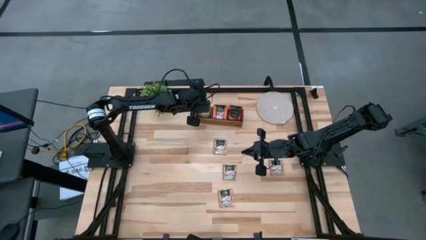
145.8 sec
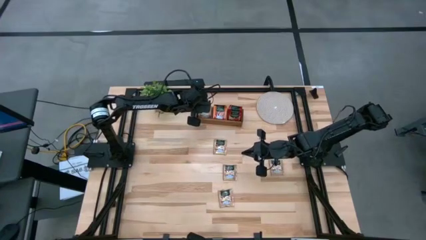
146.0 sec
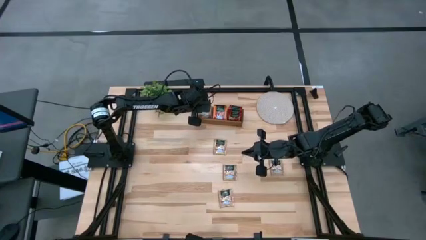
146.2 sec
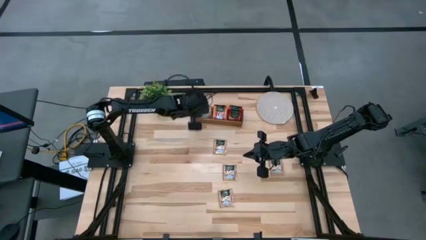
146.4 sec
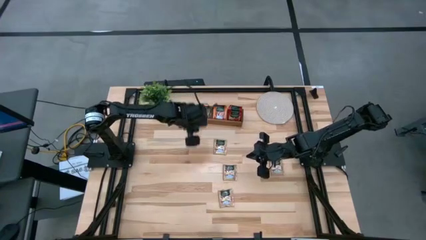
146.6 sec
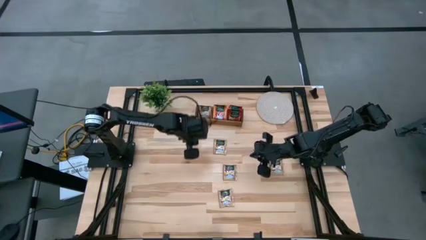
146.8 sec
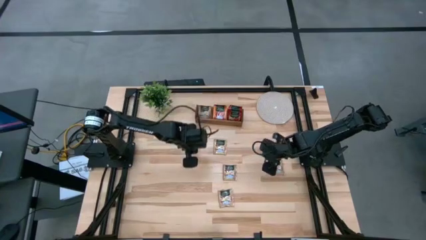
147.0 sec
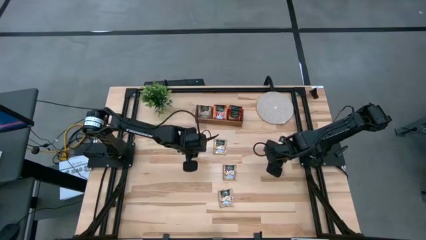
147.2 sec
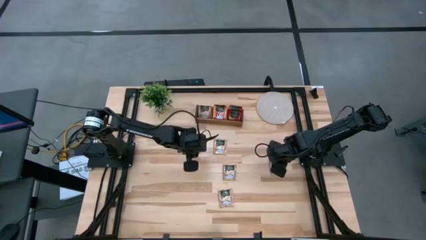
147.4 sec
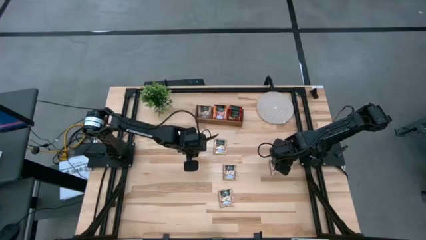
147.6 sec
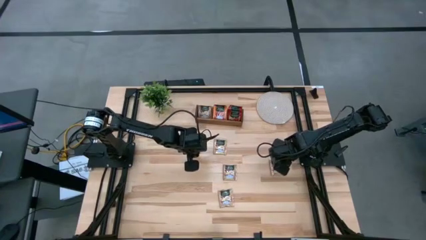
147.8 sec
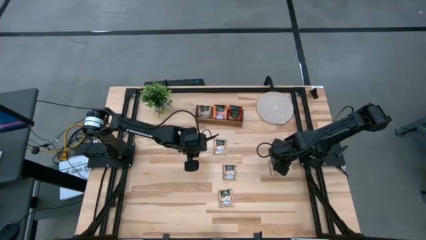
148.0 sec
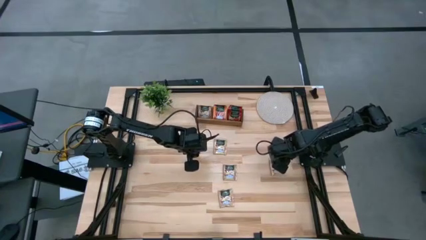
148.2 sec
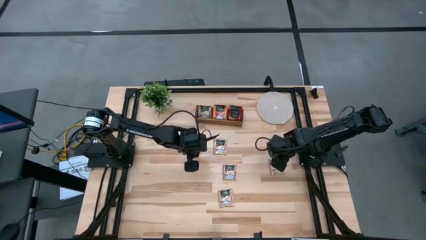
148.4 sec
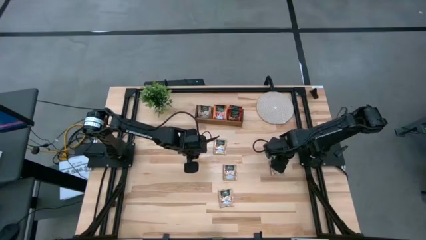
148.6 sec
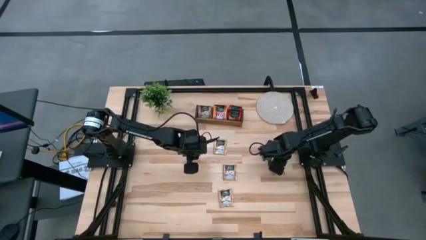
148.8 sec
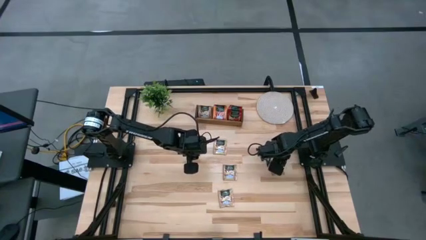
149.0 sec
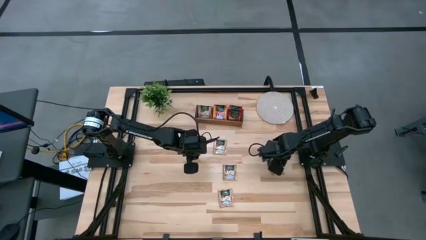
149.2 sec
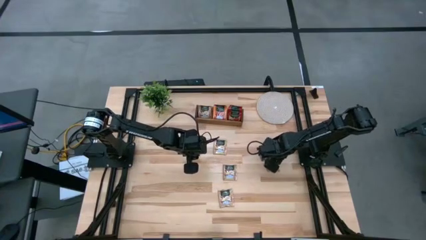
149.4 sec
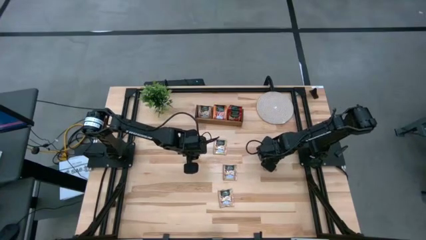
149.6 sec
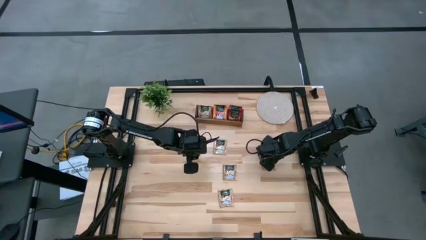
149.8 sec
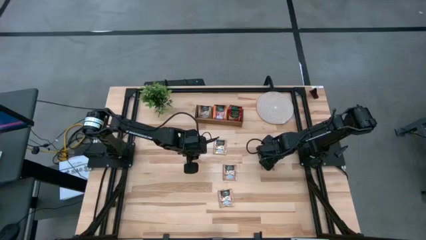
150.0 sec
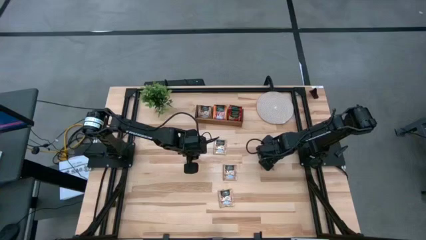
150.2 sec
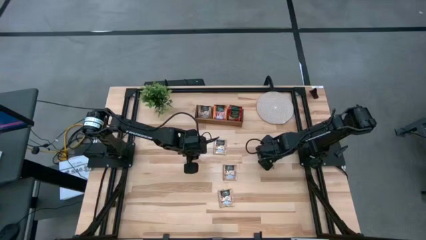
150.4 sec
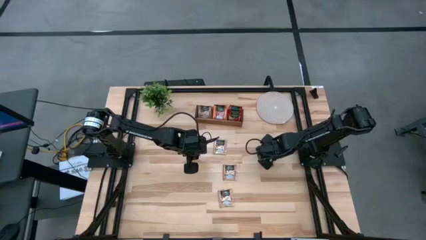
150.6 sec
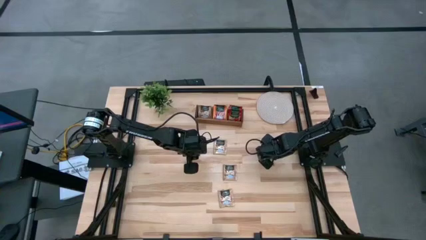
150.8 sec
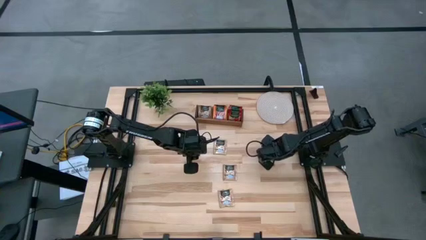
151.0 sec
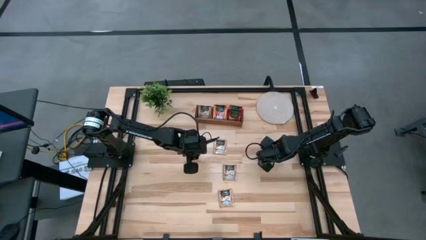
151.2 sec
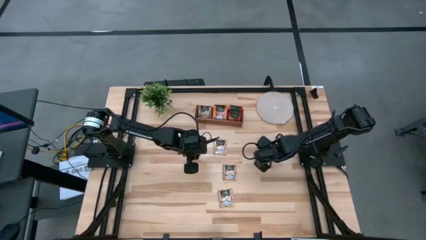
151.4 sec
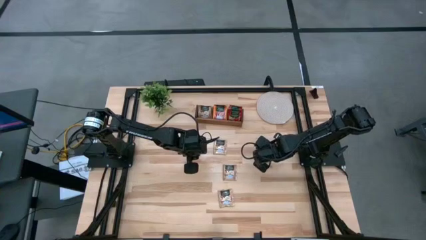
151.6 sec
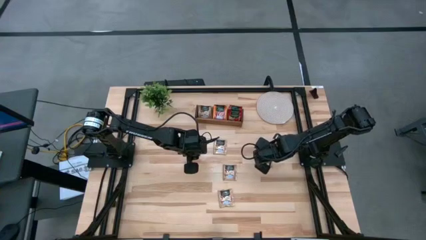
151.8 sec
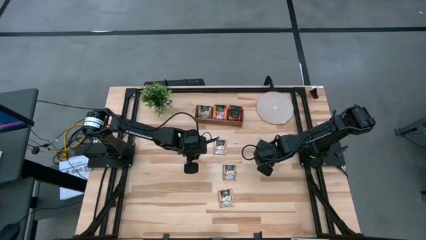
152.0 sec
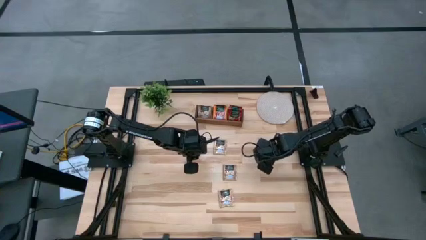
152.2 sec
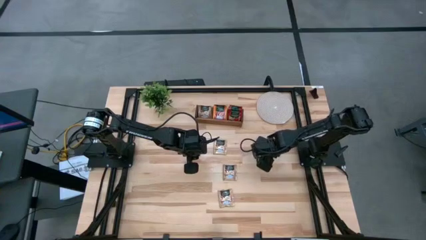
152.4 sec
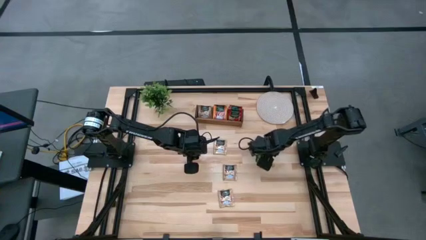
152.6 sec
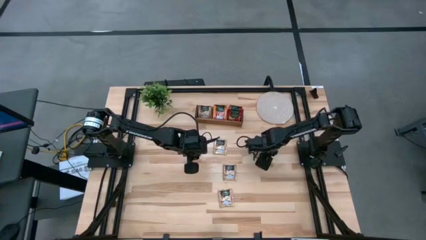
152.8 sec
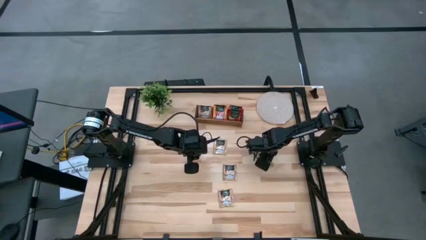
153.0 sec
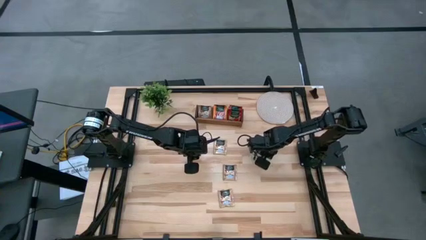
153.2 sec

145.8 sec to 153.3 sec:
Task: Pick & Place Tea
Put the brown tea bag into the left section of the wooden organizer

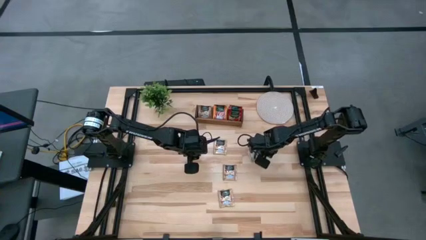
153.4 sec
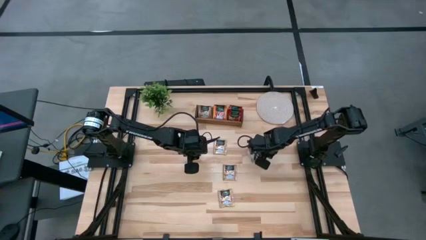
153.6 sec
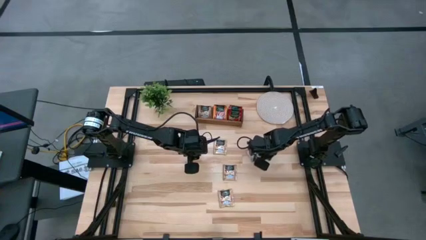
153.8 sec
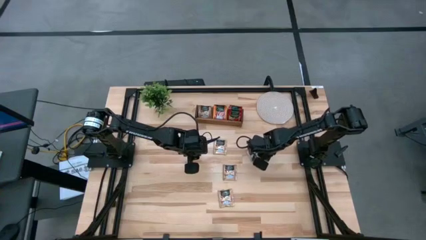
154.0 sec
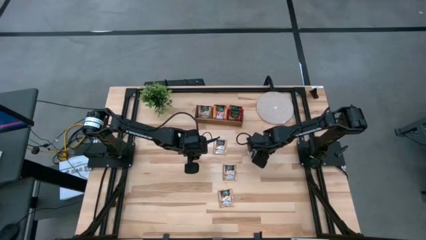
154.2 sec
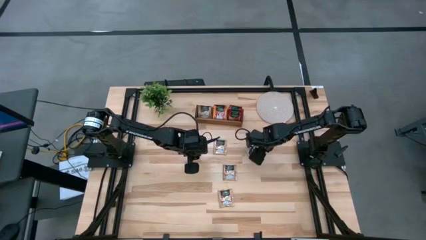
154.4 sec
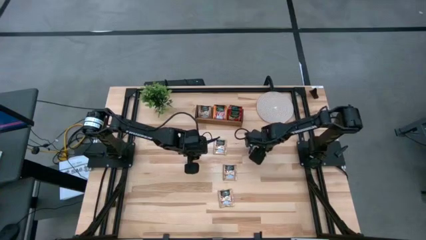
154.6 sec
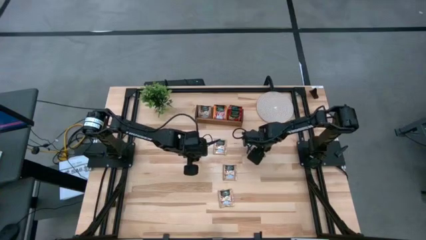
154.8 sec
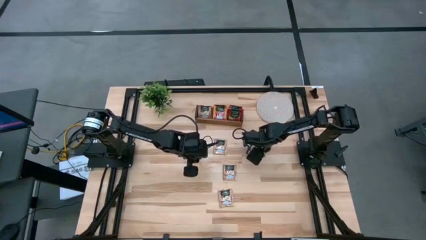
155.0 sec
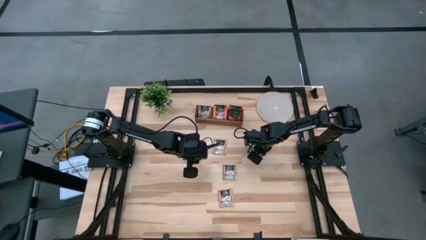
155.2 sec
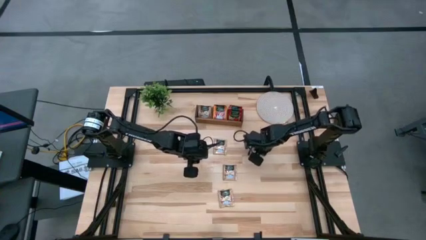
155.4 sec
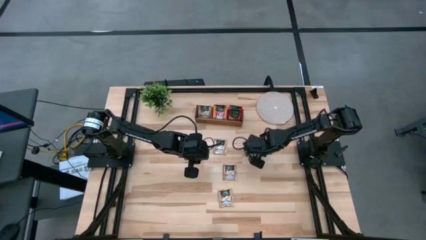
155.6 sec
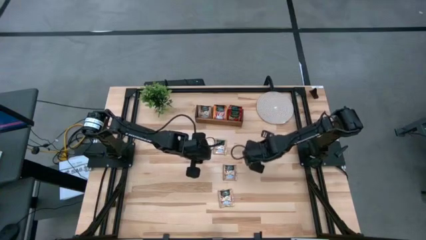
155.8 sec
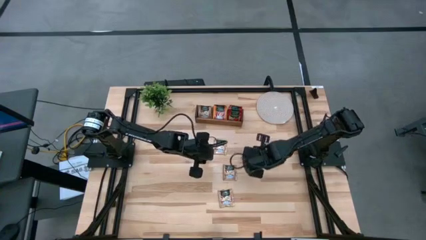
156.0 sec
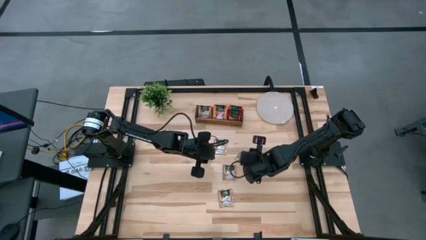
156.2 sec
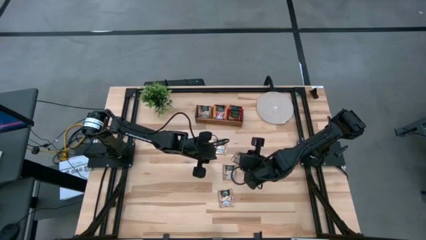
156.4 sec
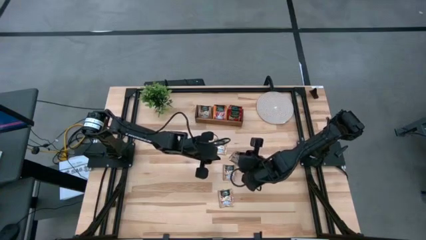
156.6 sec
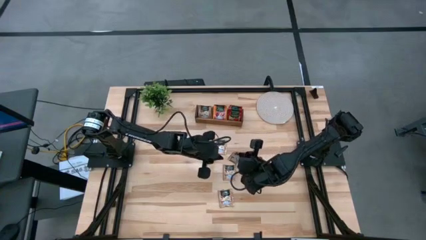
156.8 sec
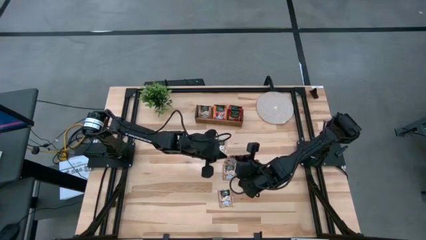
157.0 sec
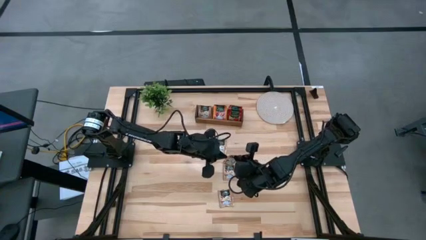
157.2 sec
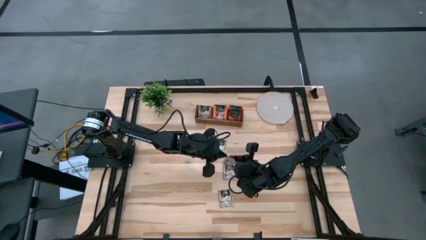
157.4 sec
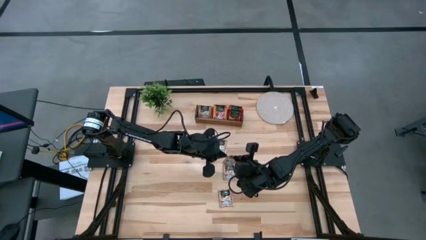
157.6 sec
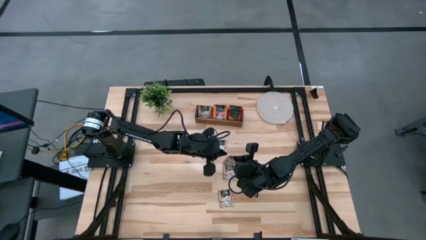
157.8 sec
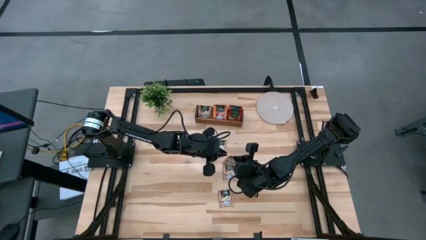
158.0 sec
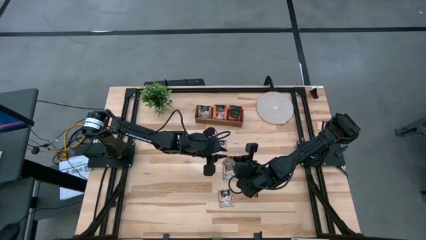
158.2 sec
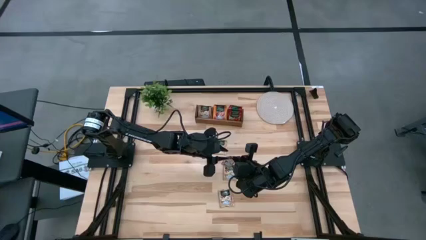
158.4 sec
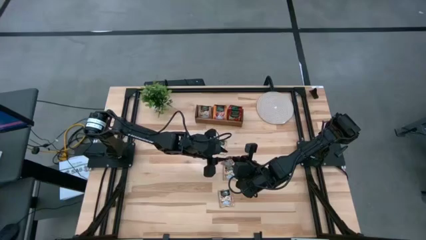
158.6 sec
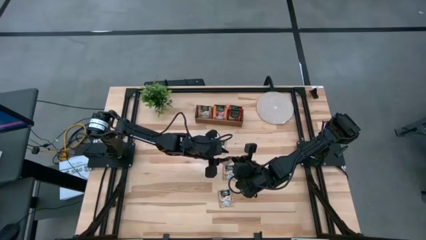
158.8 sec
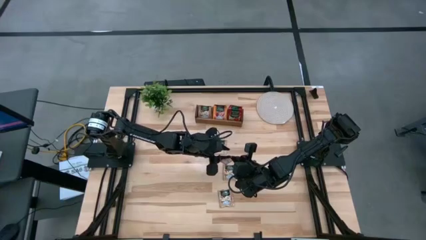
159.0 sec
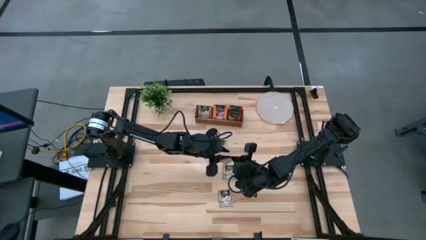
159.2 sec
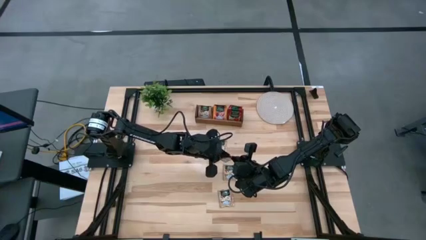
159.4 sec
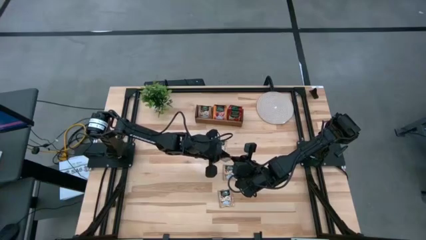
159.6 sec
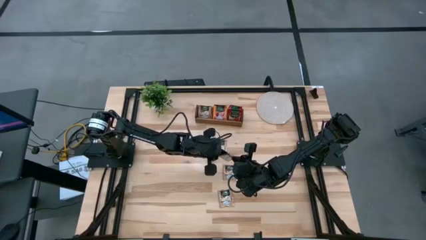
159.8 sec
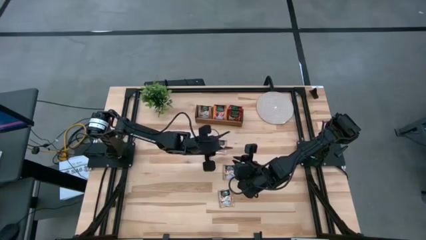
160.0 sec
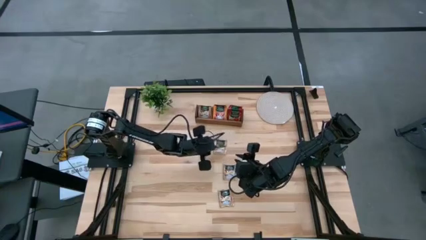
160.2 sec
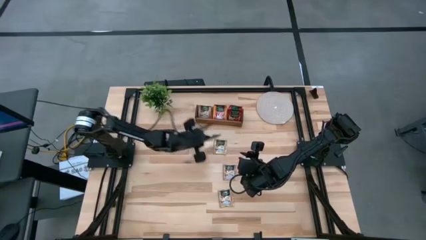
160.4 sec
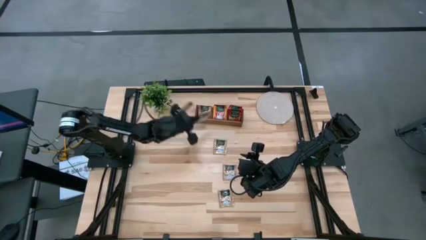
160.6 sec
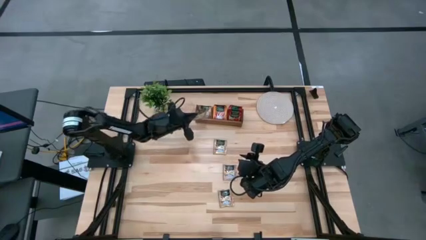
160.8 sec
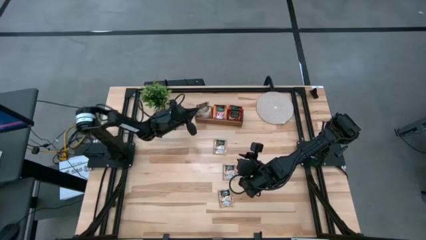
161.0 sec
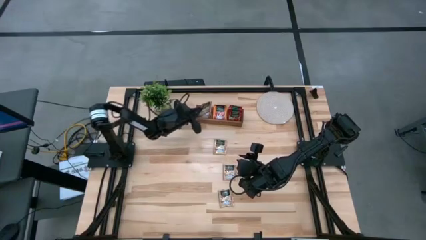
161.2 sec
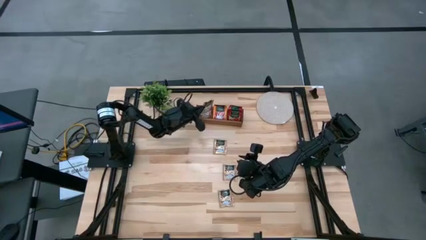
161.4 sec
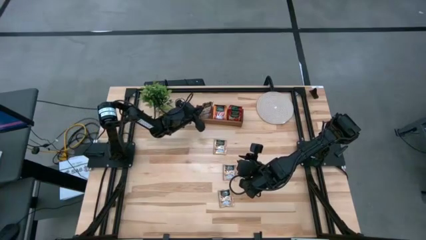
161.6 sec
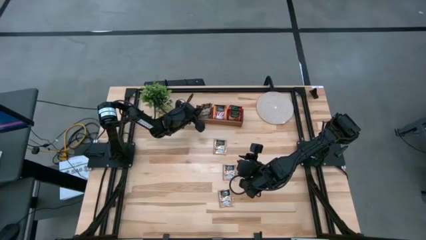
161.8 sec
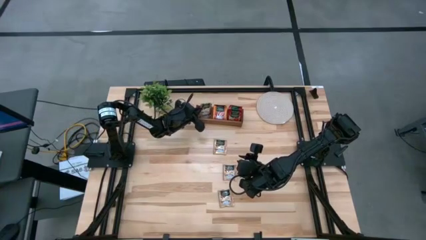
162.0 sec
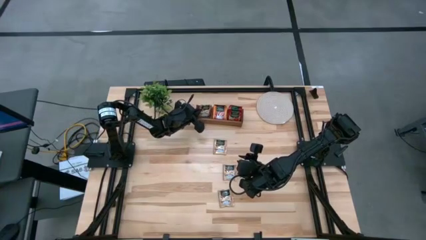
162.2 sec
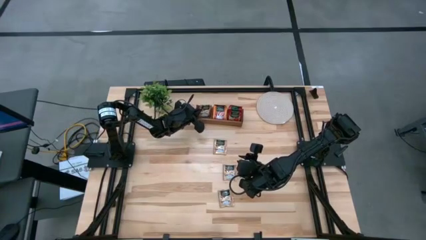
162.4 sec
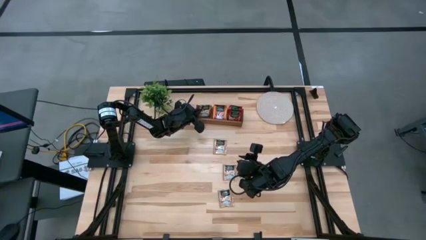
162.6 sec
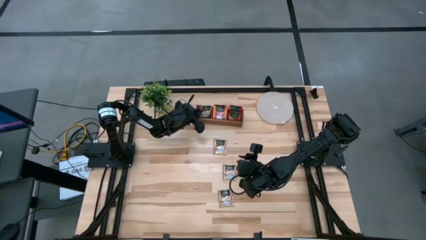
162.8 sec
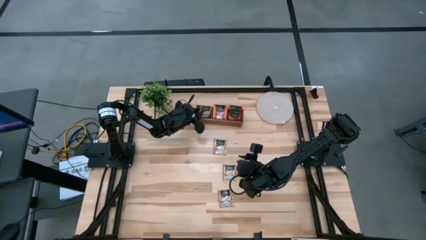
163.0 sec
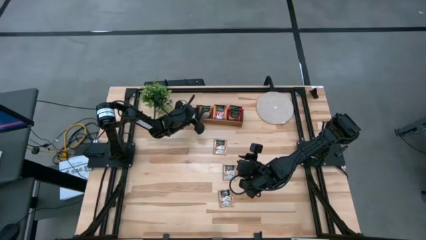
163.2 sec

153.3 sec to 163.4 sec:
Put the brown tea bag into the left section of the wooden organizer
